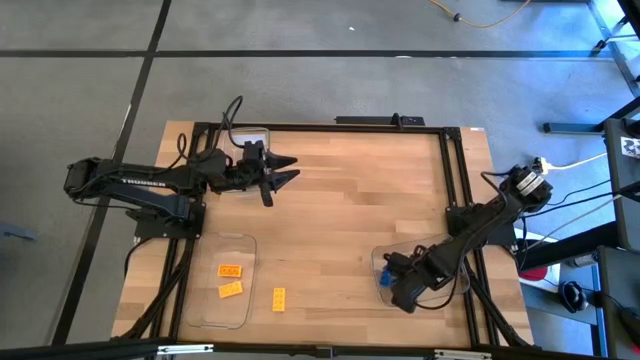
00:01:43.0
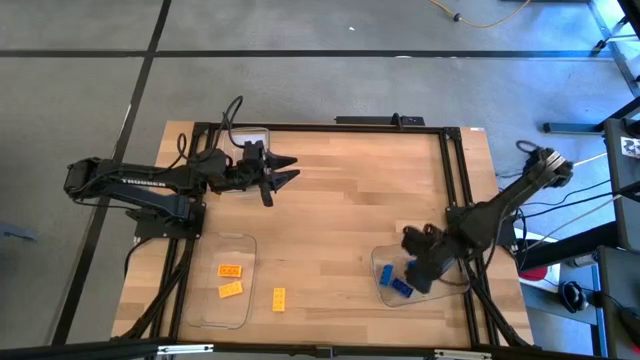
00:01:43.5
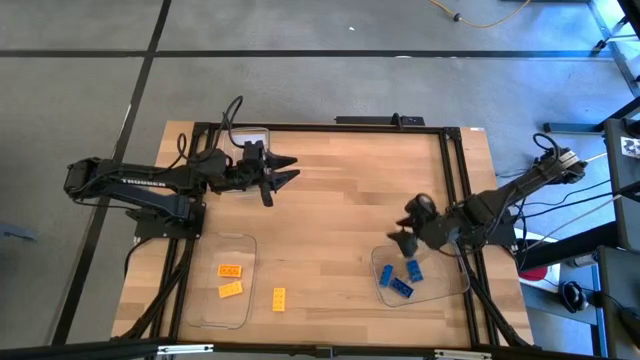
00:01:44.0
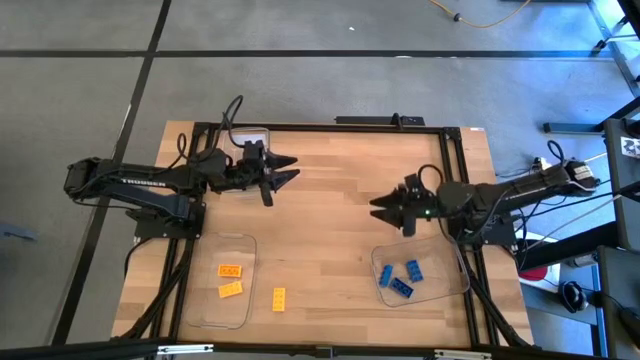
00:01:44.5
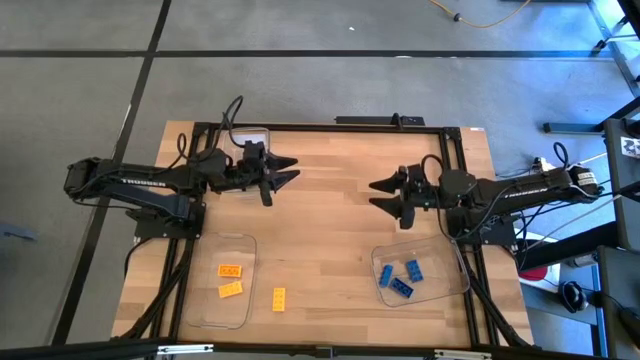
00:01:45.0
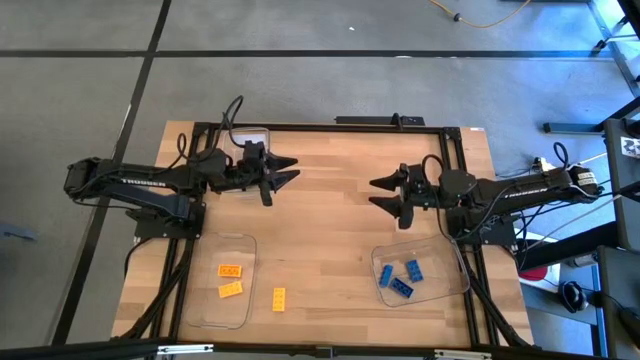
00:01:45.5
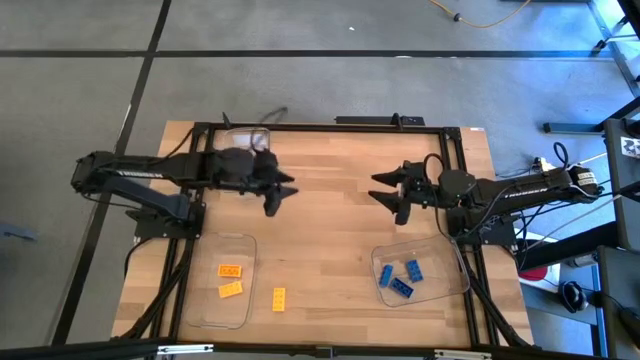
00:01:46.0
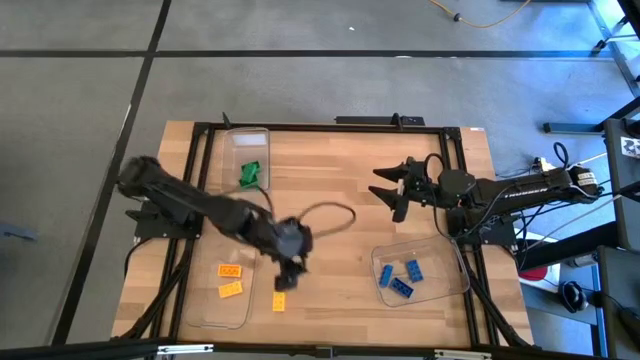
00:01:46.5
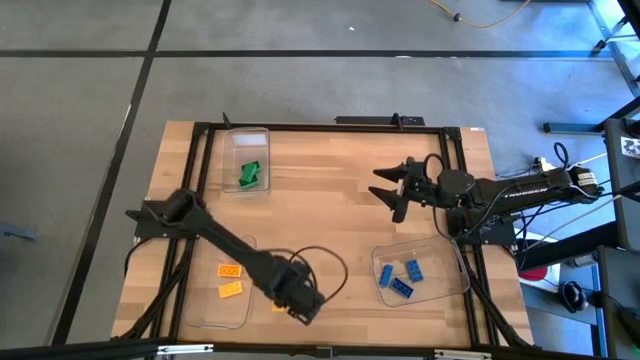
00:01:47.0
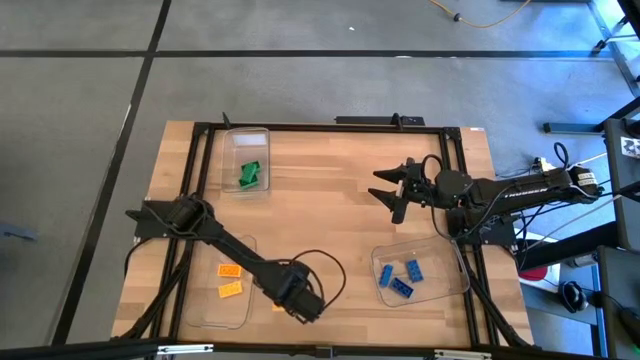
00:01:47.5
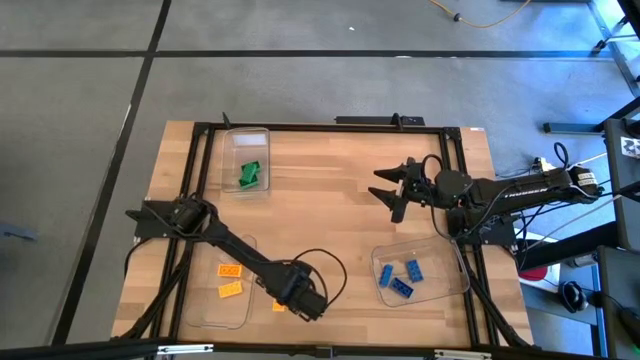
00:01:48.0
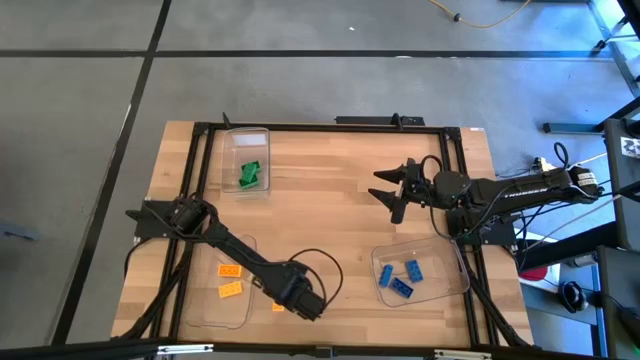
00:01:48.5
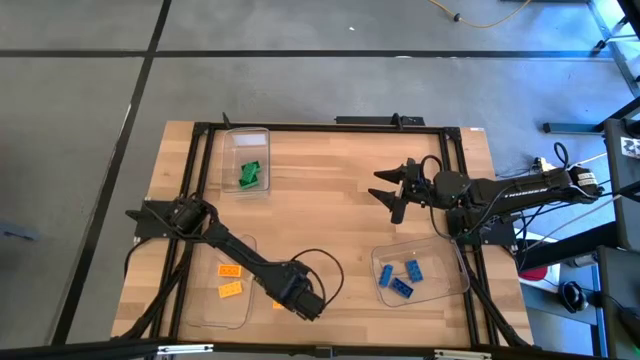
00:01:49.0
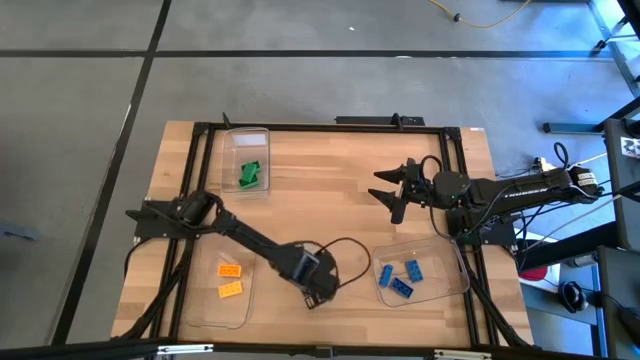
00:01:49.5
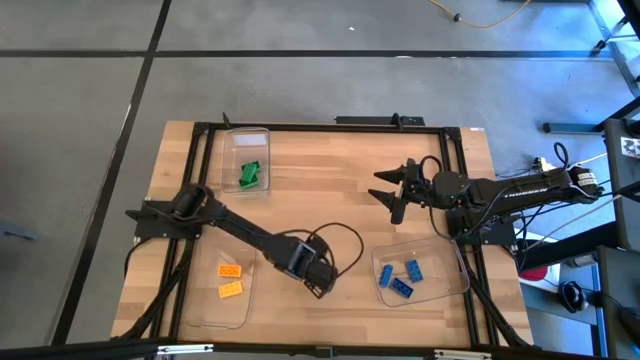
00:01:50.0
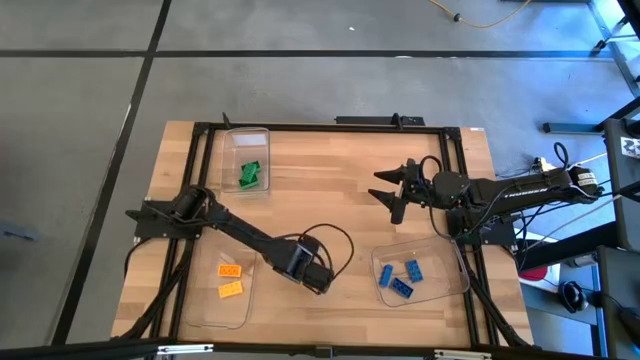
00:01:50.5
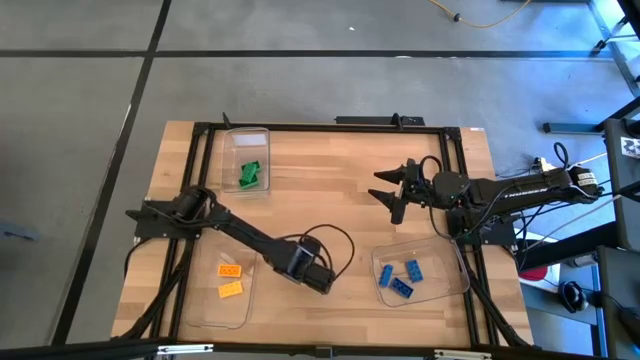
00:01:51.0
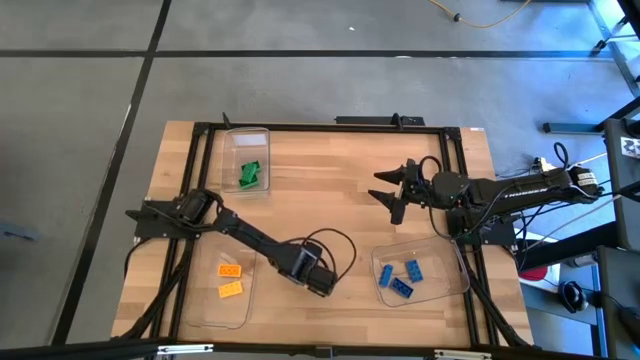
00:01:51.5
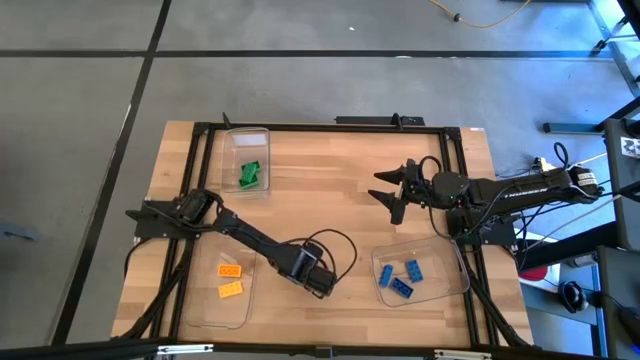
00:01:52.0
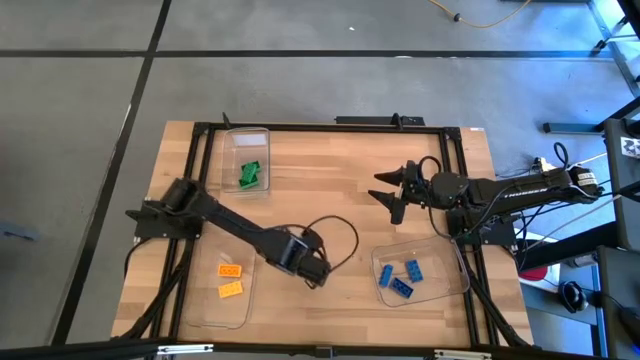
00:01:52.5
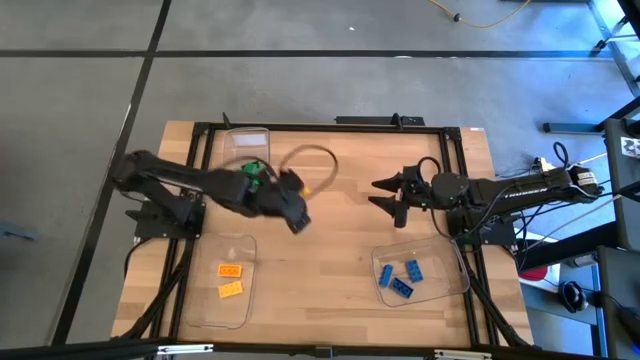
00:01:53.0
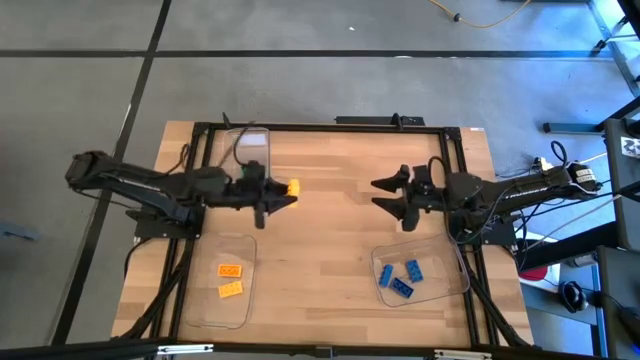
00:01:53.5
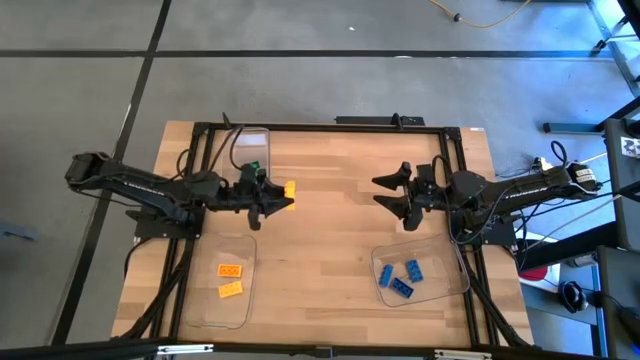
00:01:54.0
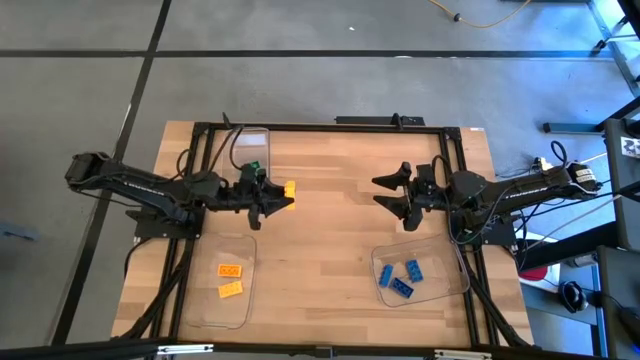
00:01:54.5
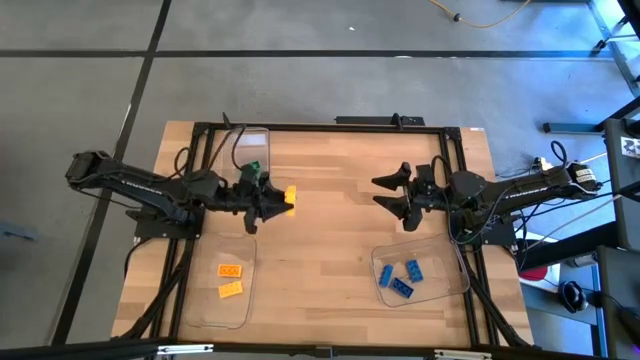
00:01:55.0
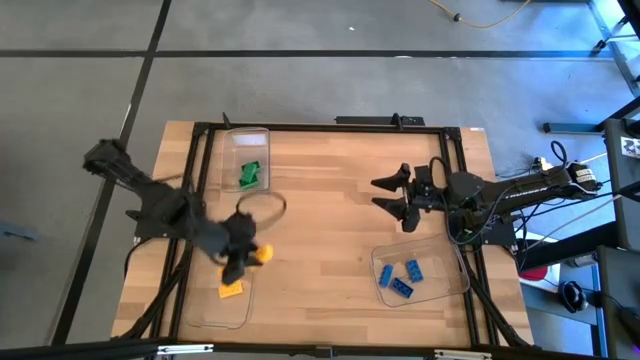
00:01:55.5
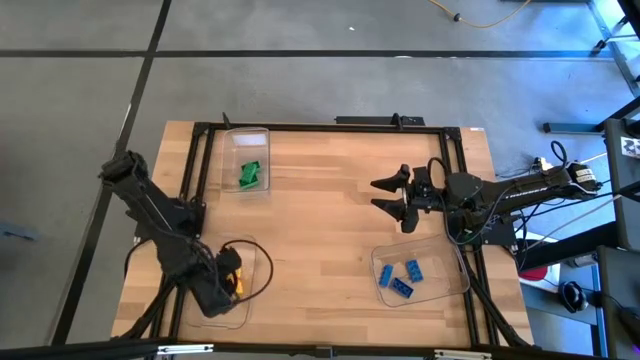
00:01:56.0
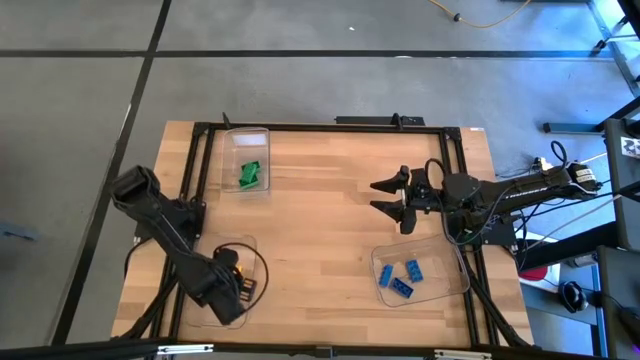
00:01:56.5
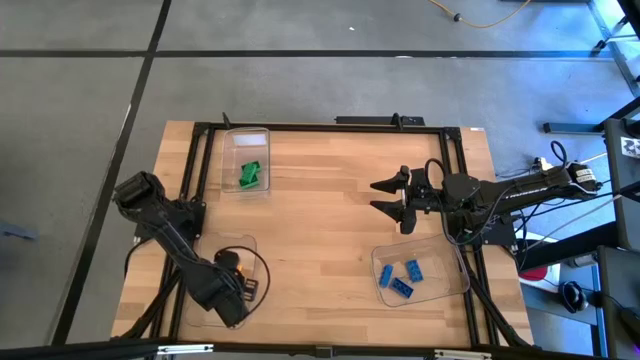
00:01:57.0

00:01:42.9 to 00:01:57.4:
Task: Sort & place blocks by color
Put the yellow game piece into the bottom left transparent bin

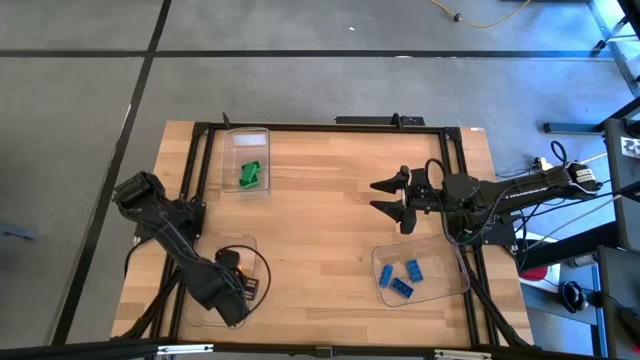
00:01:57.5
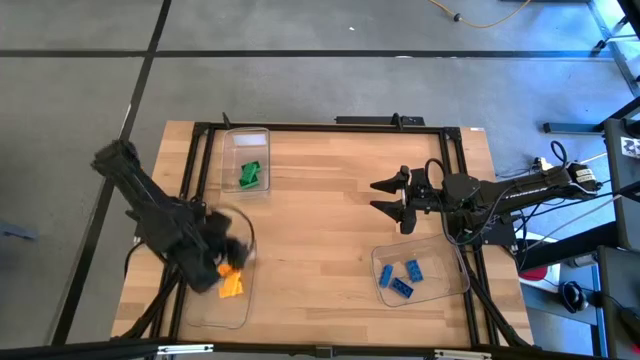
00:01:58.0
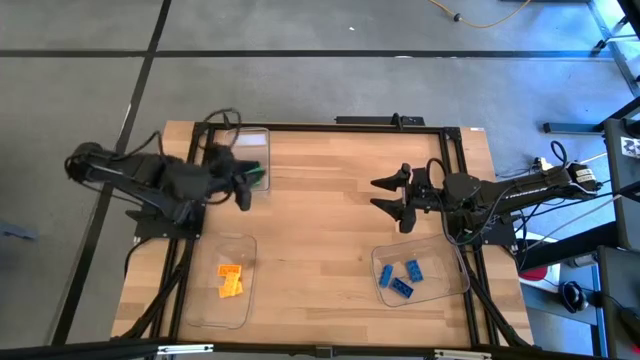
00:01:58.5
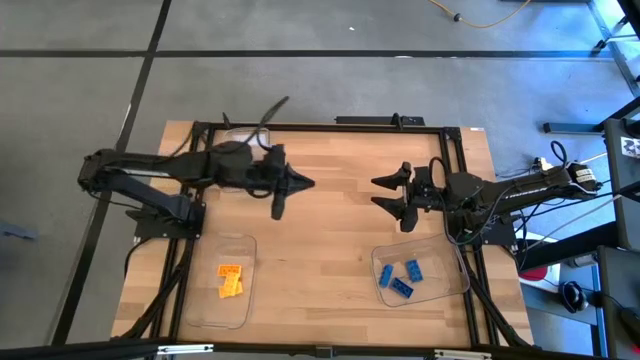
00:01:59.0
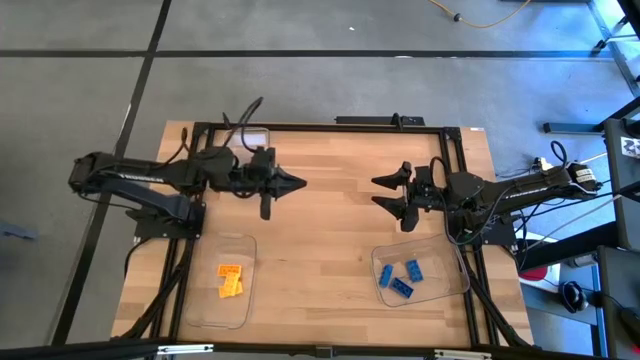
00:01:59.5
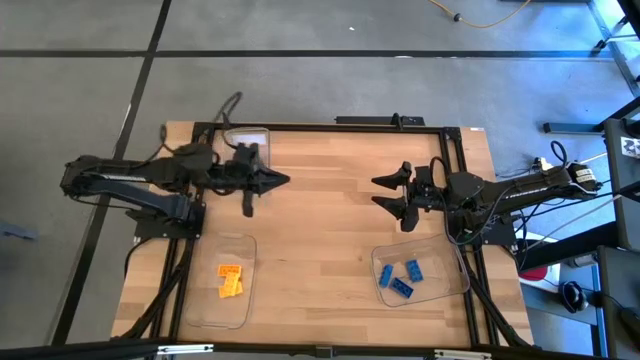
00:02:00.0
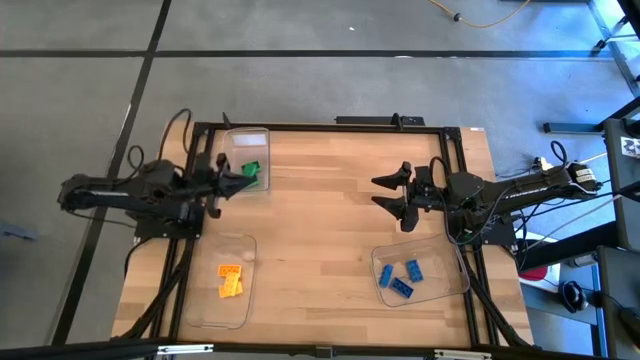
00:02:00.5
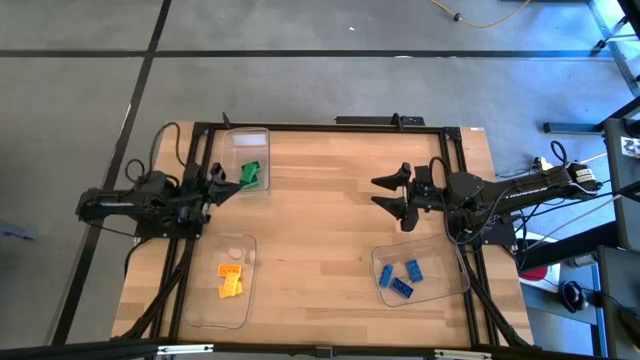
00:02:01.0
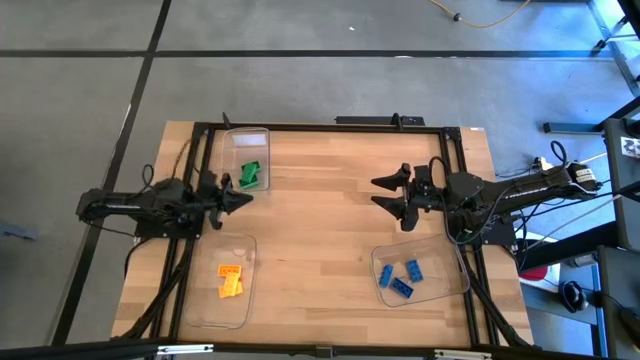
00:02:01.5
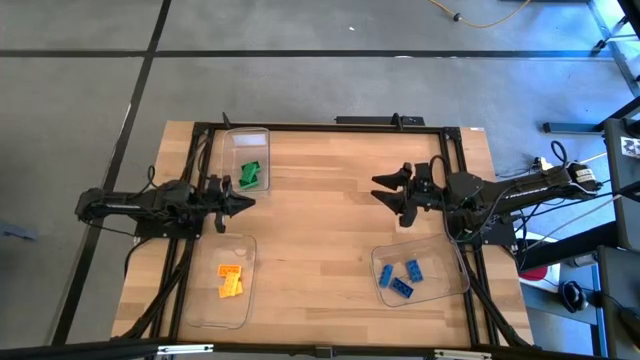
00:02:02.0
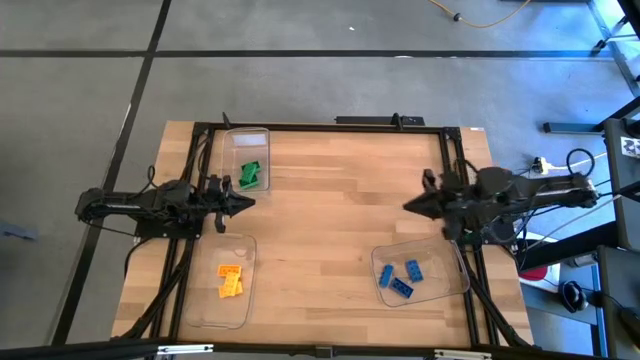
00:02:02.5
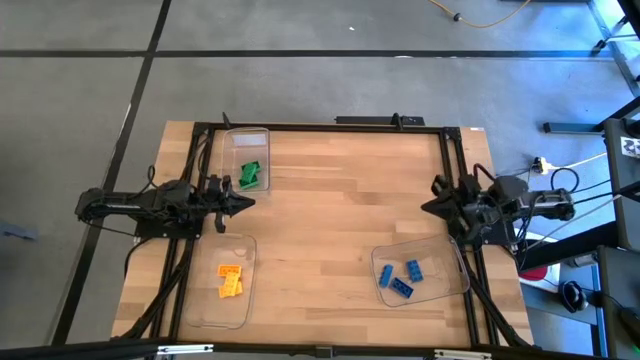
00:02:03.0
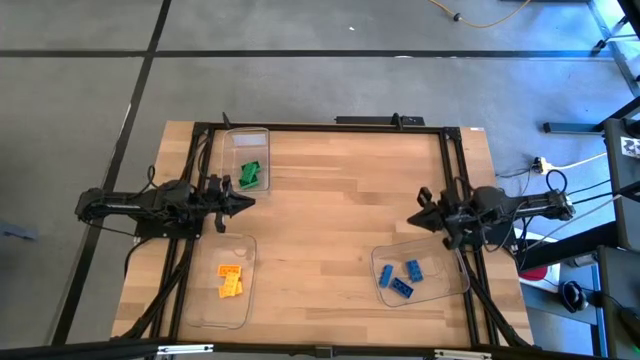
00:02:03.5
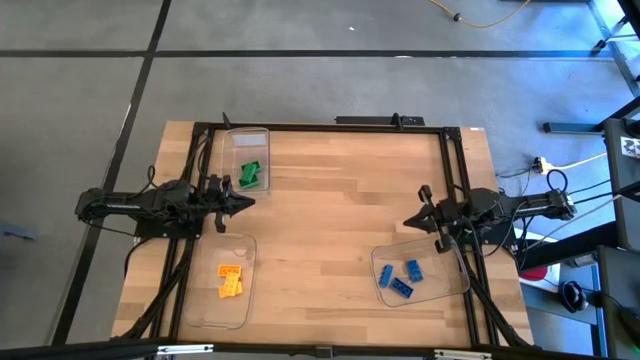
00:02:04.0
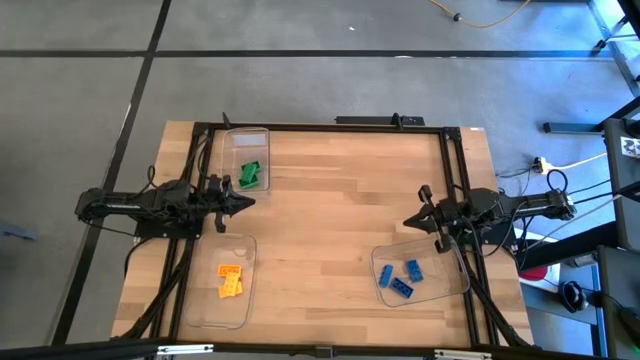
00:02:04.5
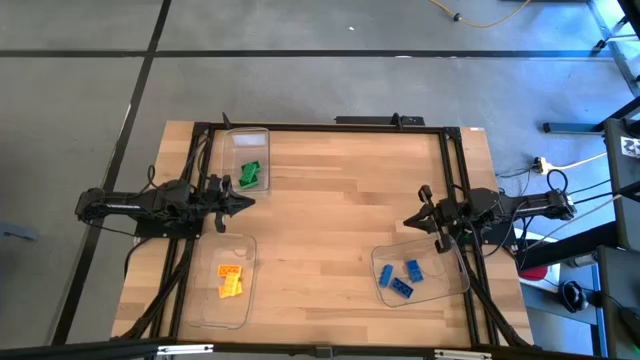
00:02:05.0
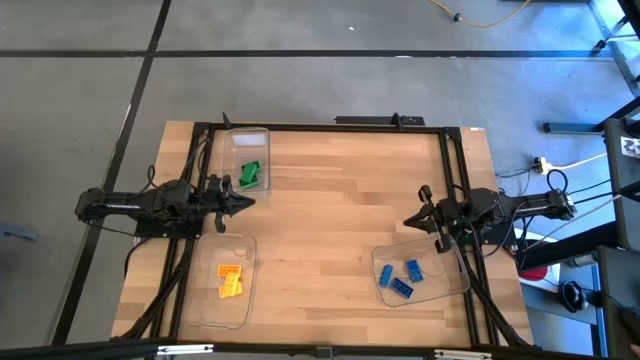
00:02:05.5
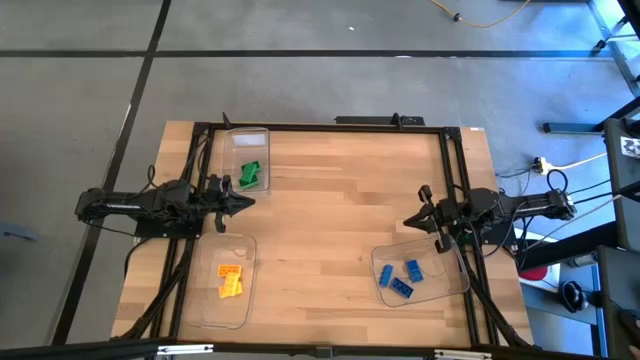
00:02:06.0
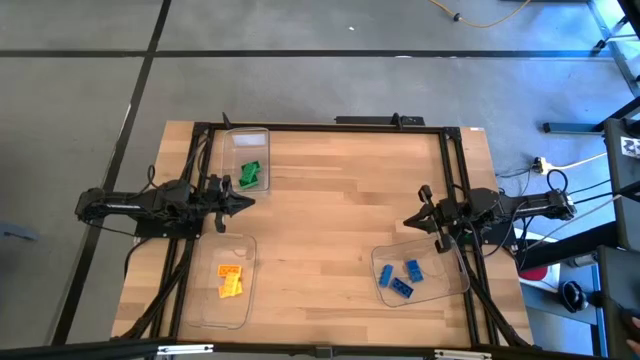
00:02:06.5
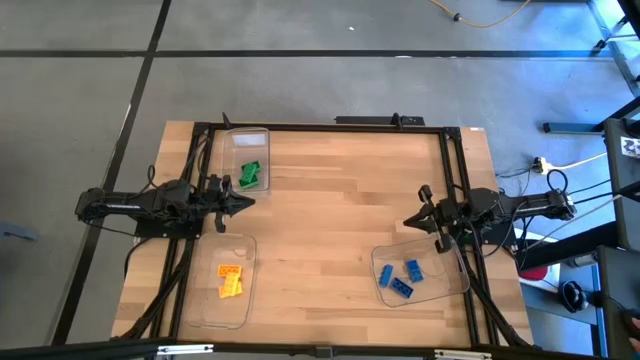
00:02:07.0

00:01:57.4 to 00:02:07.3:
Return to Home Position
